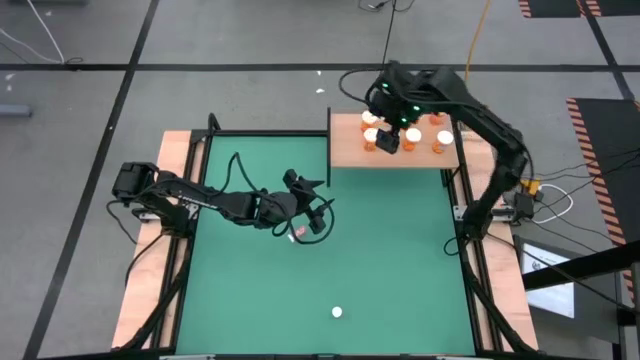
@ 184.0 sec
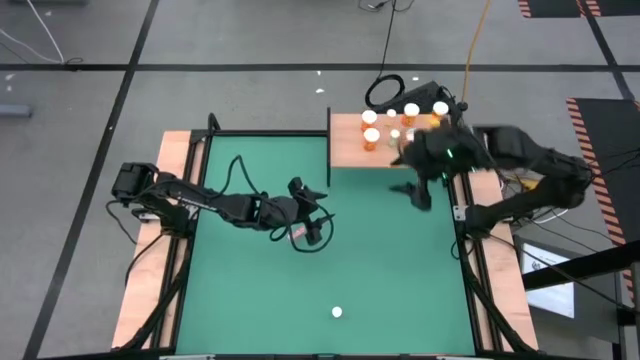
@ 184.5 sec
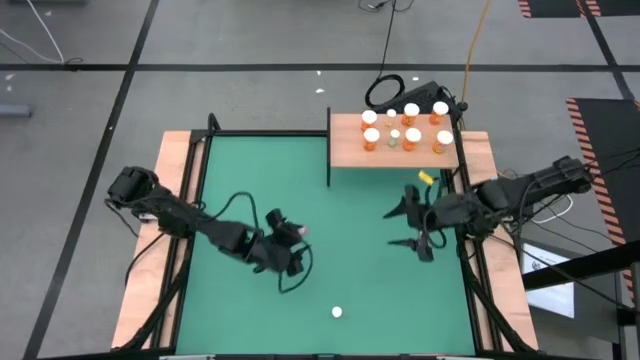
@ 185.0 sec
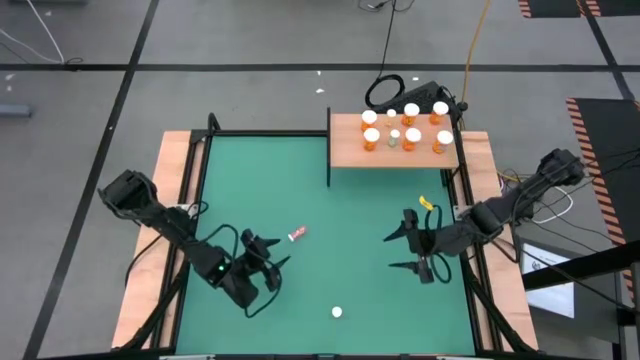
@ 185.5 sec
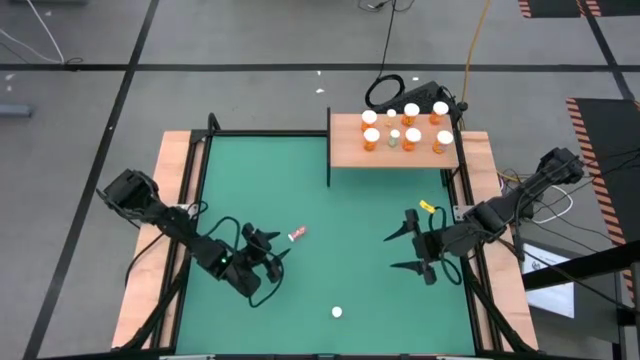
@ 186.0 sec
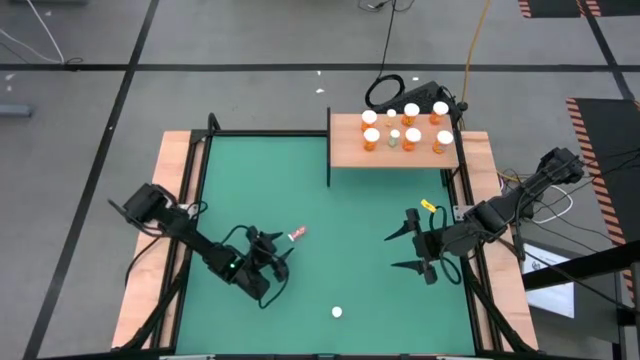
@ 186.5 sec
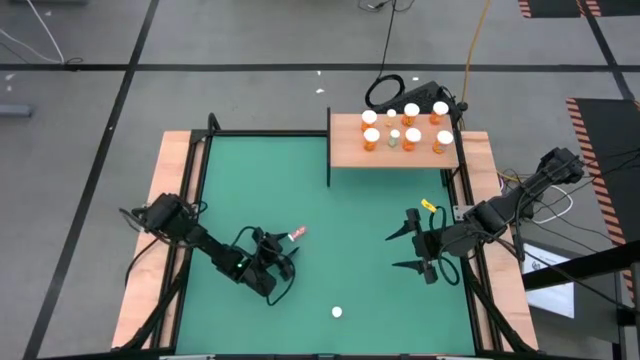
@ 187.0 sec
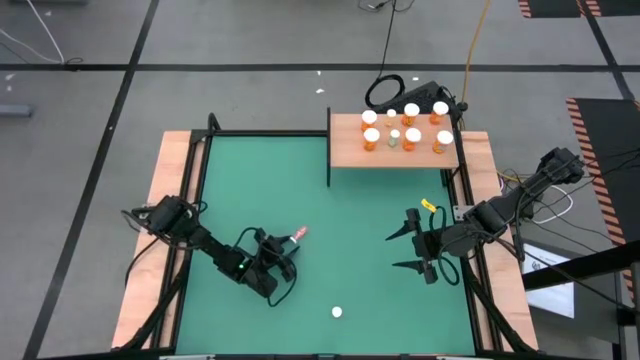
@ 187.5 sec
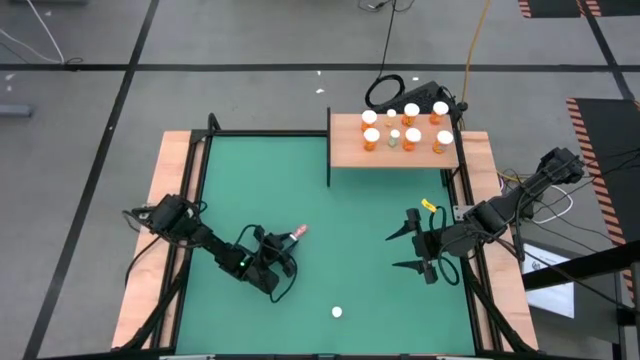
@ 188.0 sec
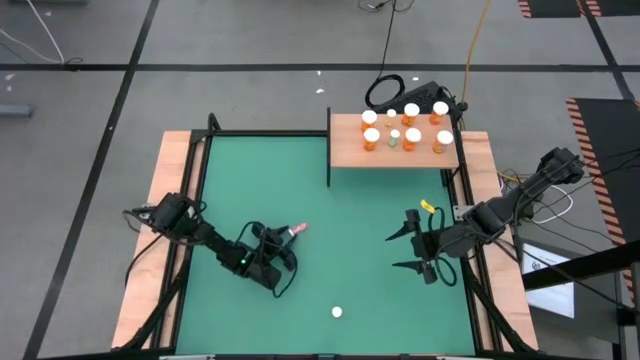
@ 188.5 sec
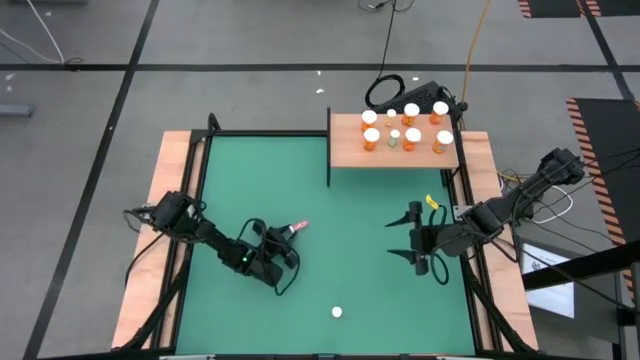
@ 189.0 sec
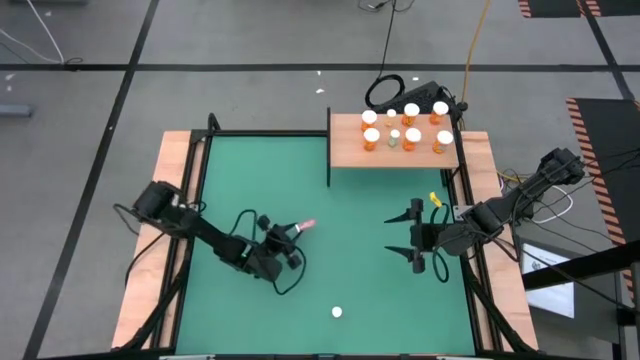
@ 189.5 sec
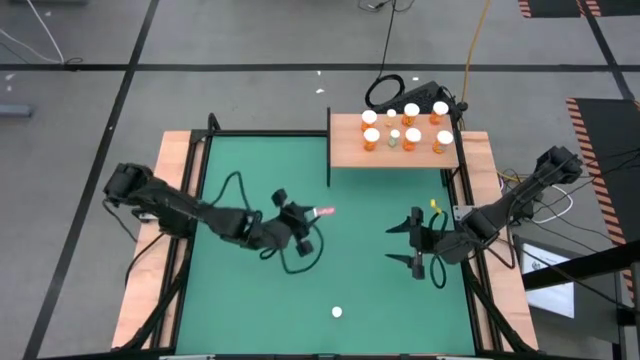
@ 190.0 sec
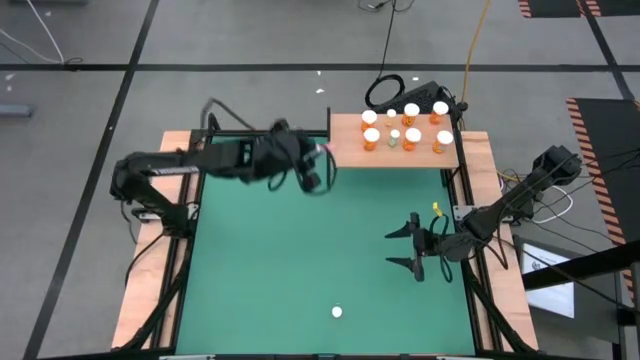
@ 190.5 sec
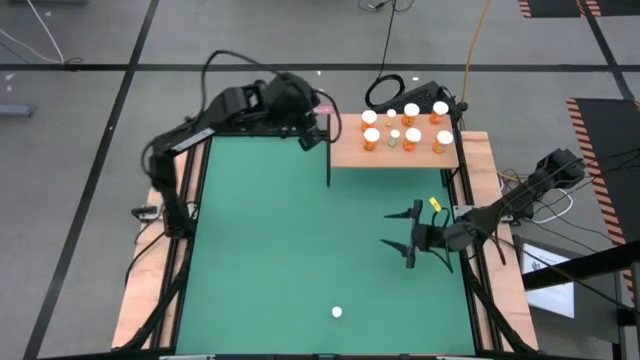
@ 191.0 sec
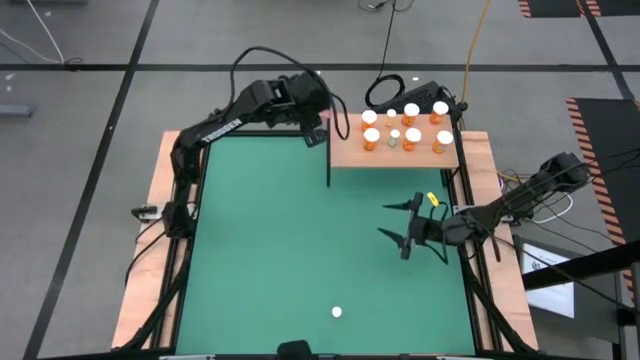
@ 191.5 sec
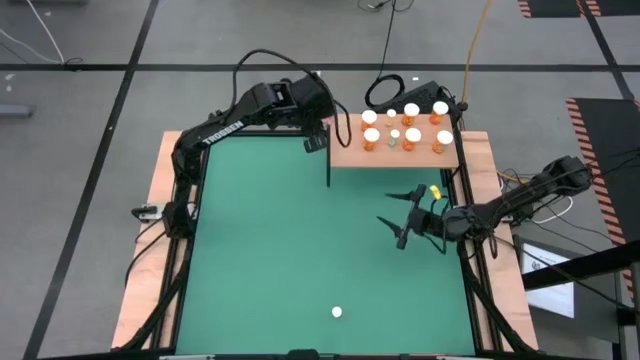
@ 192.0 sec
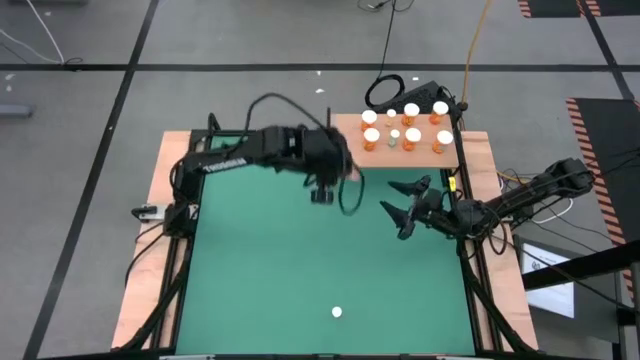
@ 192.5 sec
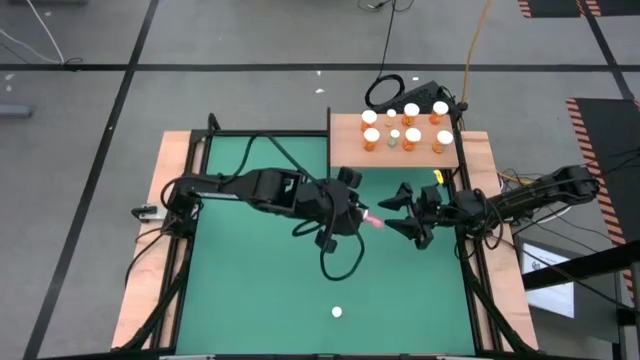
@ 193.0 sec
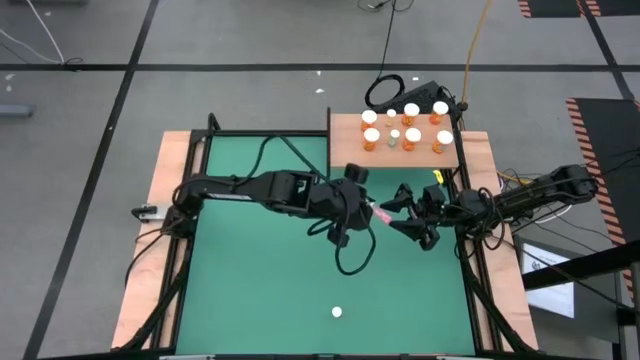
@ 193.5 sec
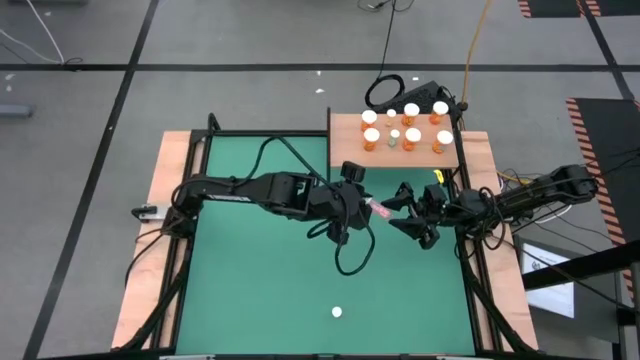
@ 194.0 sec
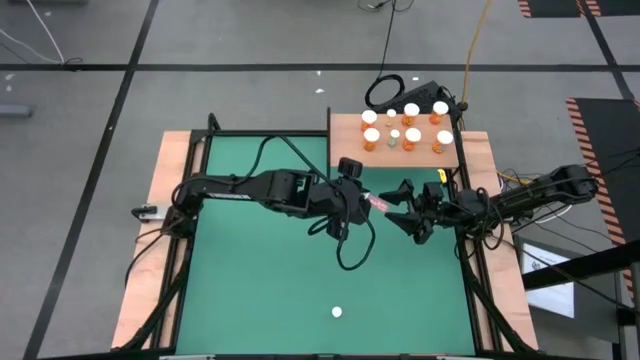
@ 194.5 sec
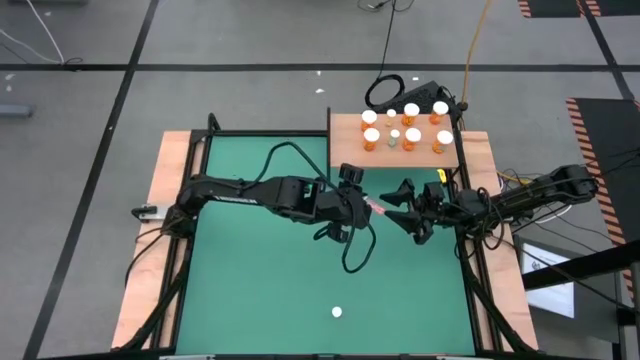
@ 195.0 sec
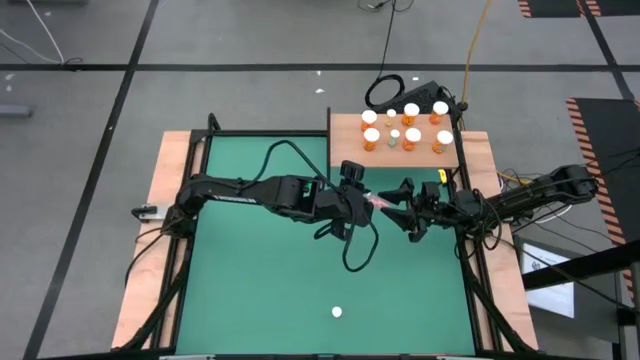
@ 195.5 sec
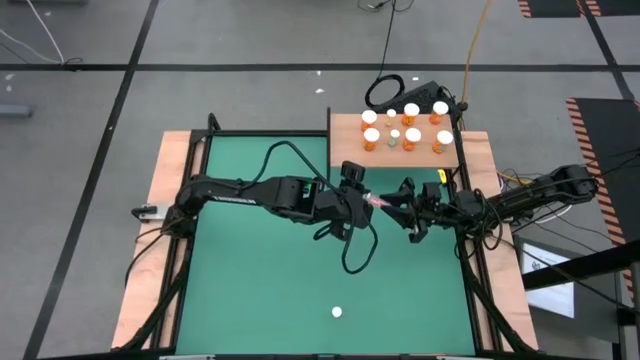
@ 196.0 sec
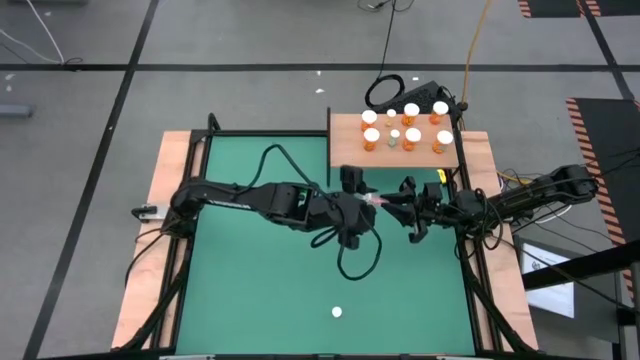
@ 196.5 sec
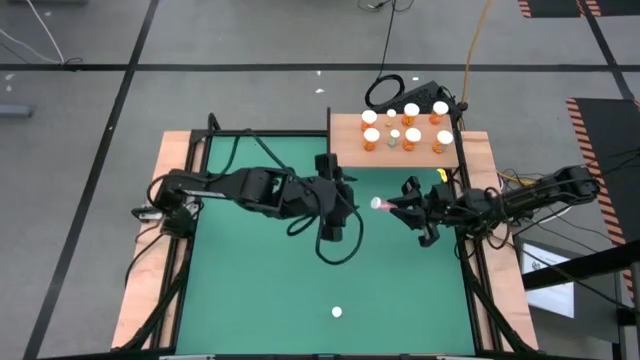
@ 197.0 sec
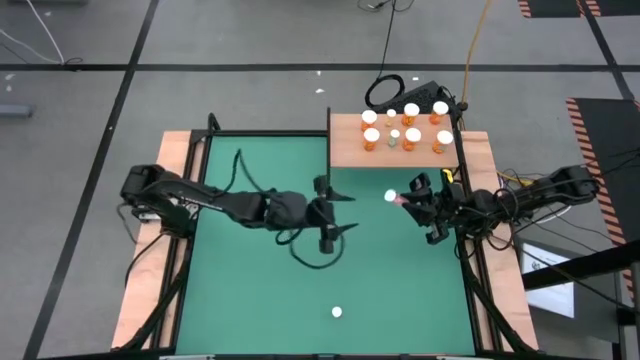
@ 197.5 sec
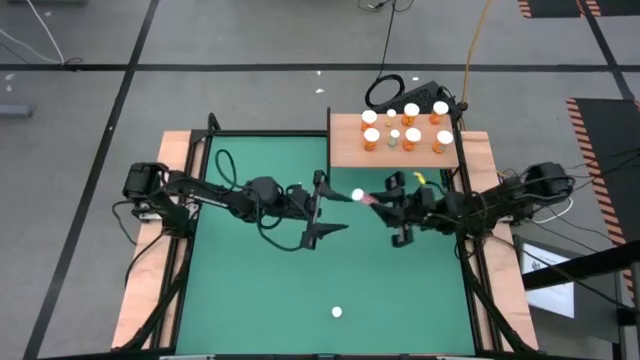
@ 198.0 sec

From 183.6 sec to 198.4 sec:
Task: Pick and place medicine bottles onto shelf by color
Put the pink pill bottle on the shelf

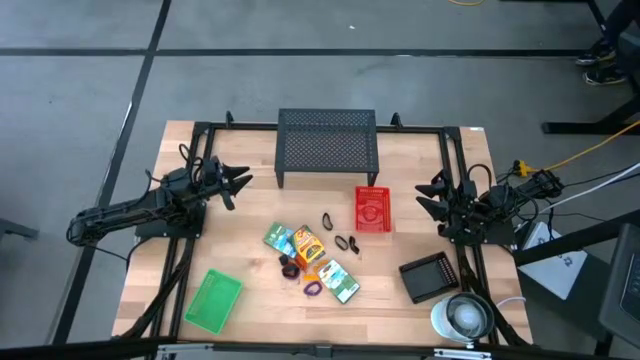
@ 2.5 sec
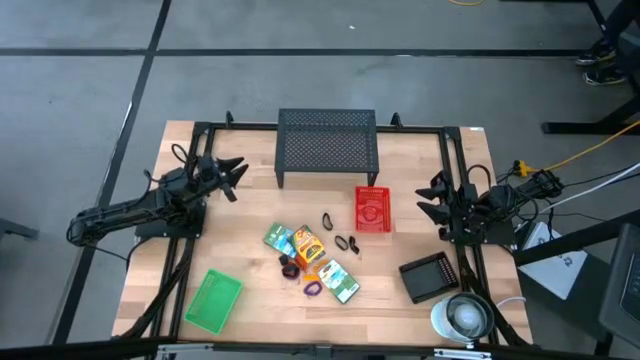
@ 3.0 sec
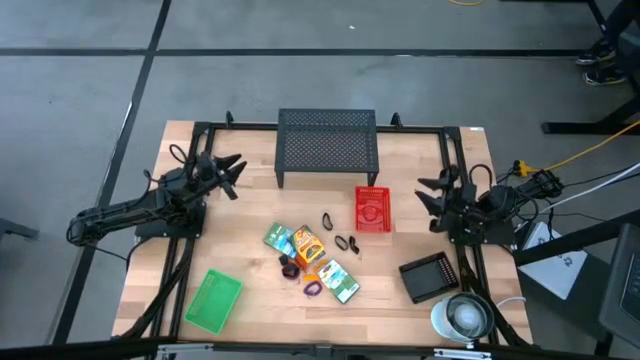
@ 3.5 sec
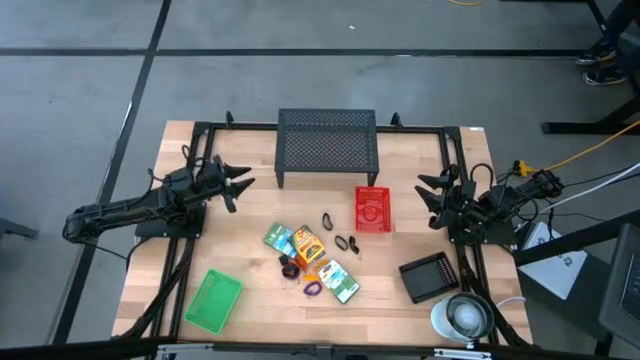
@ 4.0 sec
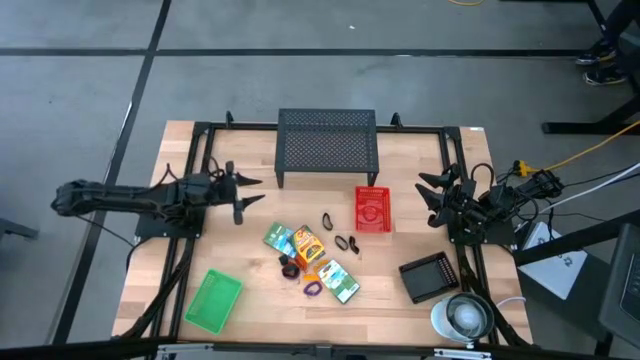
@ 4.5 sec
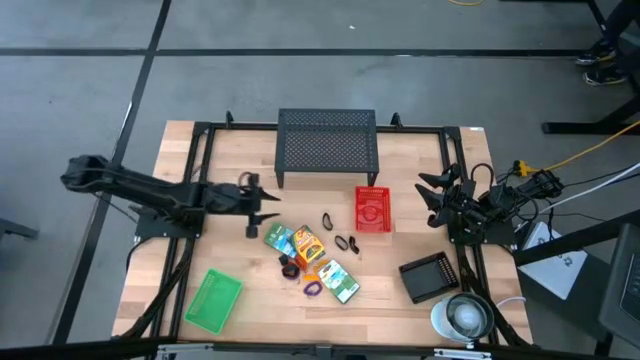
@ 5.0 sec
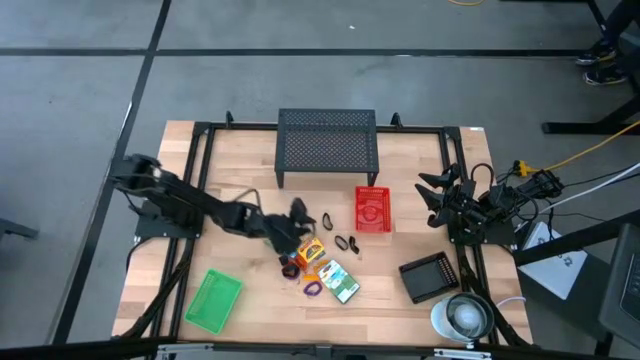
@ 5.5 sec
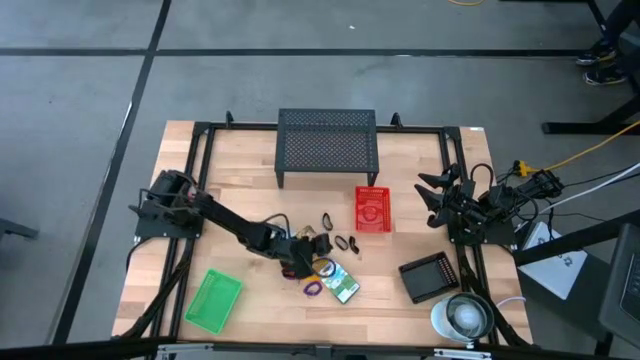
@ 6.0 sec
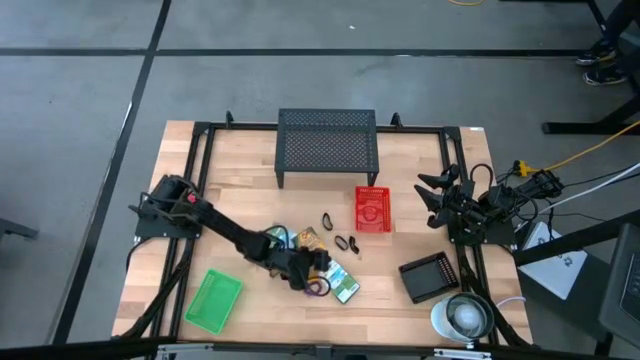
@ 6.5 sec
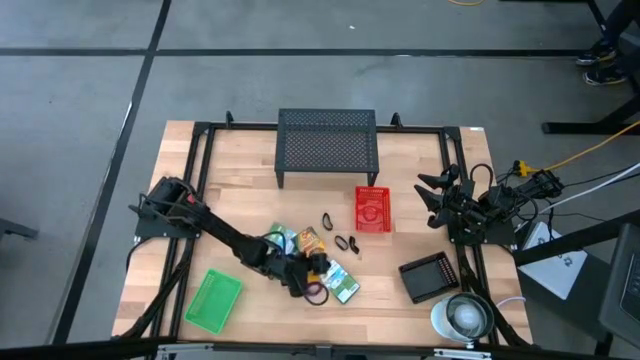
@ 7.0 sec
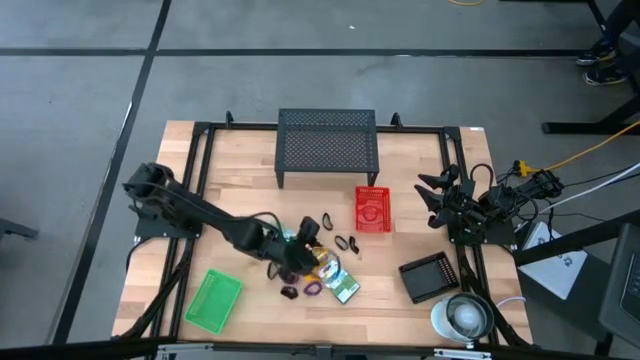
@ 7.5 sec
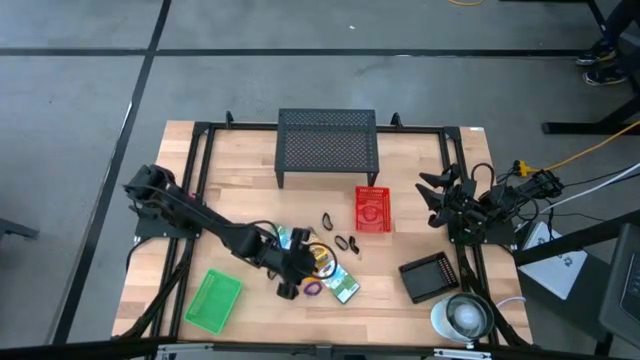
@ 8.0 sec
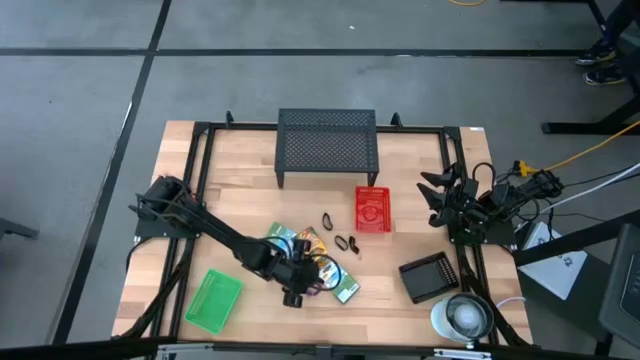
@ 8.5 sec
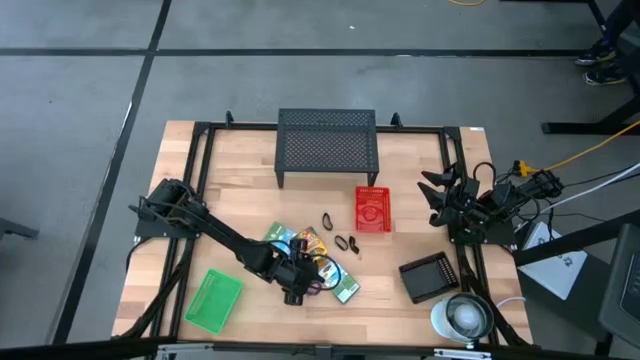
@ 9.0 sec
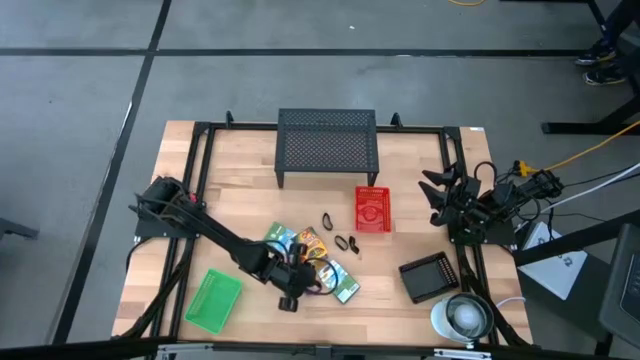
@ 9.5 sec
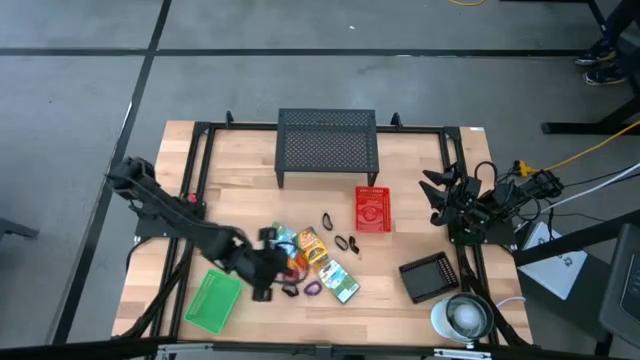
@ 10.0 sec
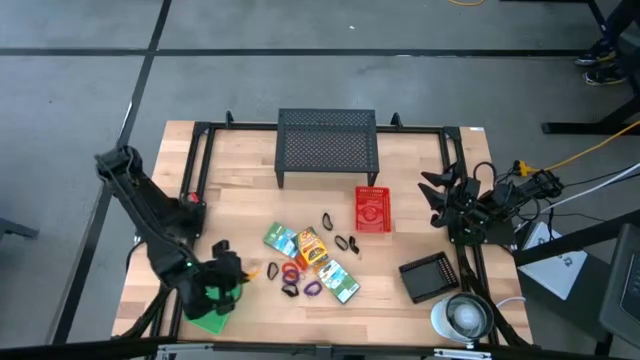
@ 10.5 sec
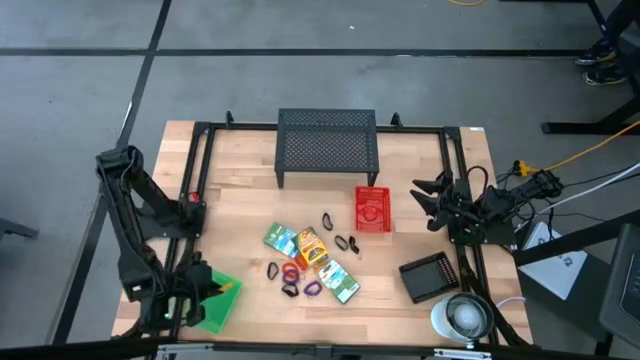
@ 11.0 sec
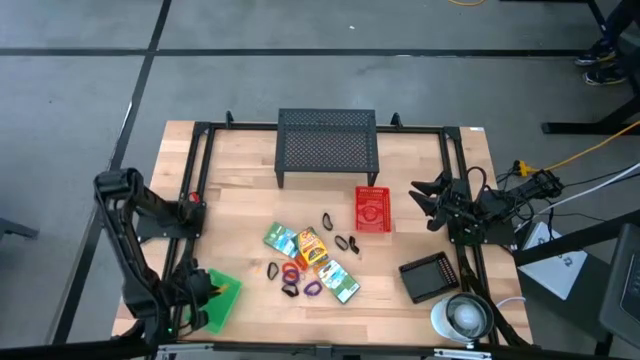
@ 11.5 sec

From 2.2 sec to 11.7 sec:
Task: Pick & Place Office Desk Supplies
Put the yellow spring keychain into the green bin
